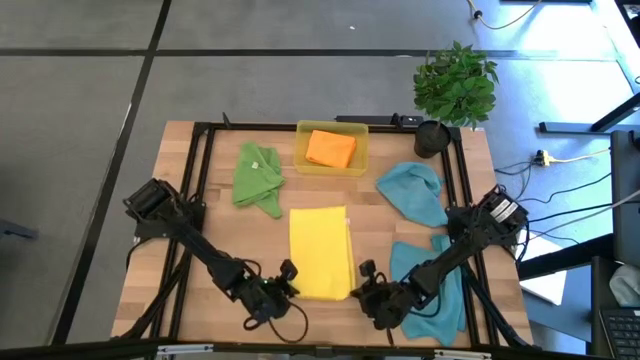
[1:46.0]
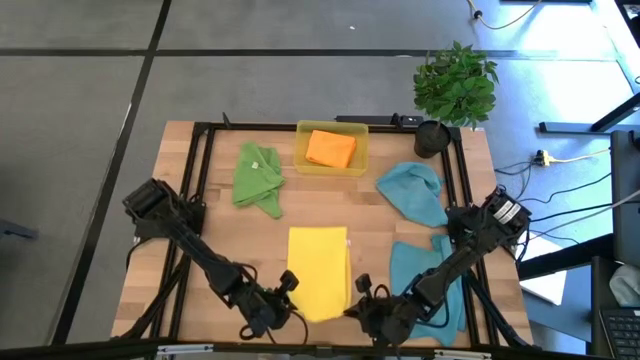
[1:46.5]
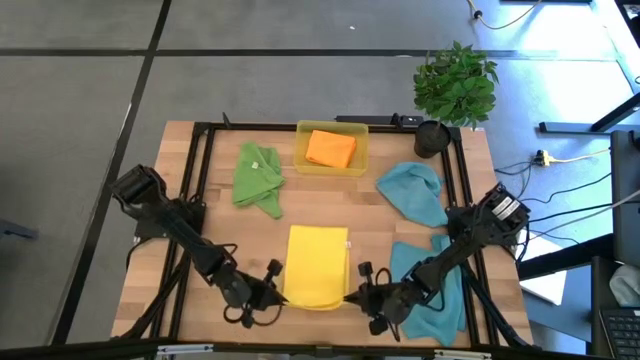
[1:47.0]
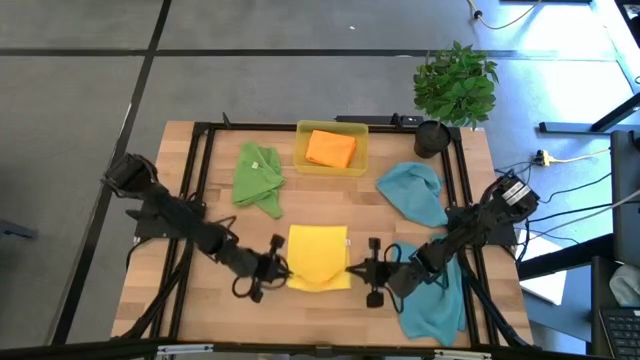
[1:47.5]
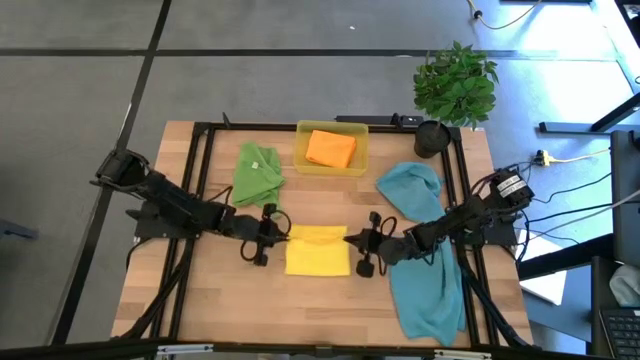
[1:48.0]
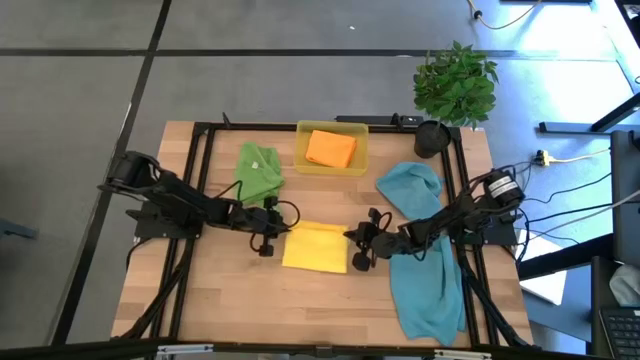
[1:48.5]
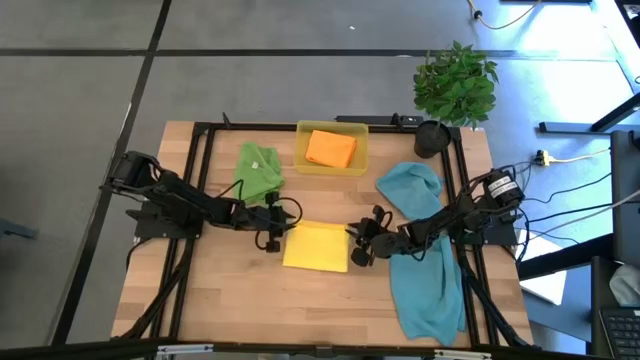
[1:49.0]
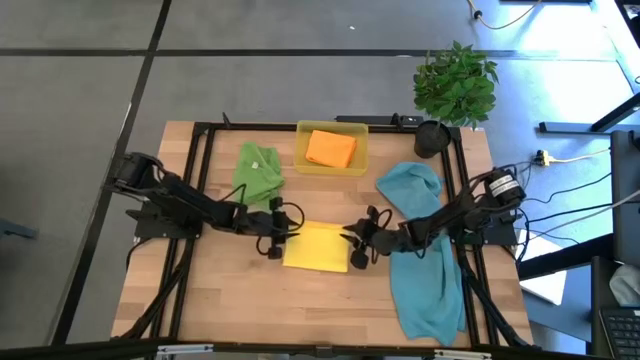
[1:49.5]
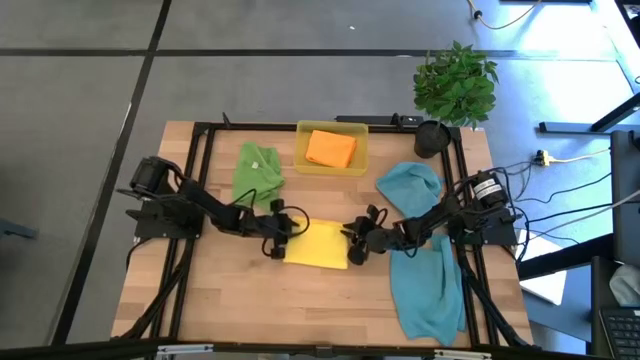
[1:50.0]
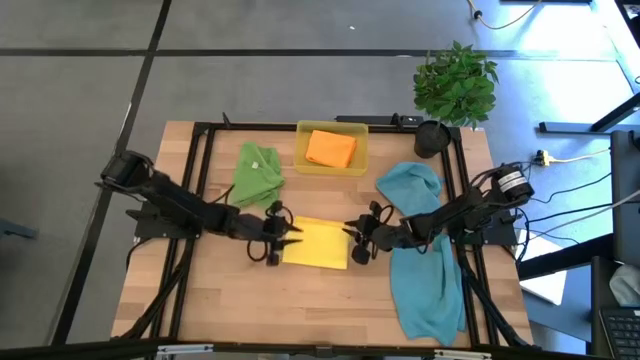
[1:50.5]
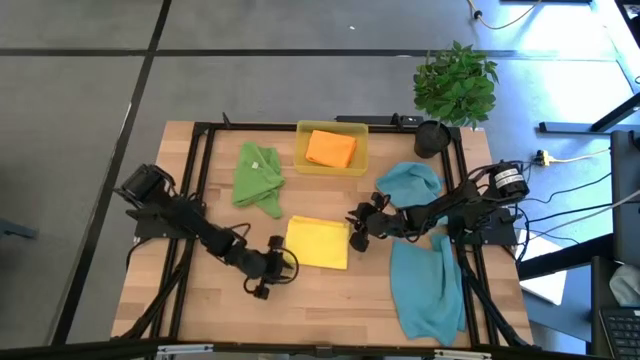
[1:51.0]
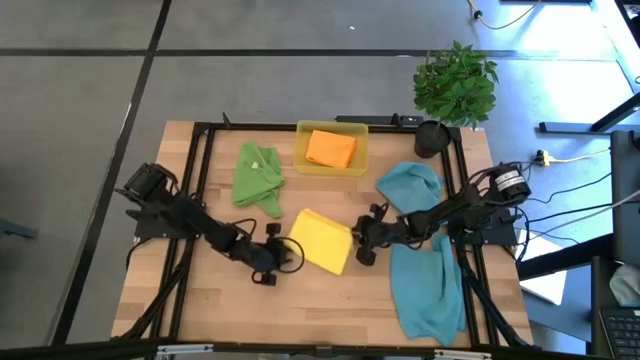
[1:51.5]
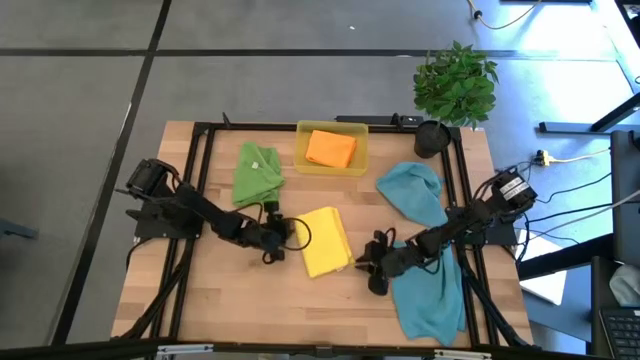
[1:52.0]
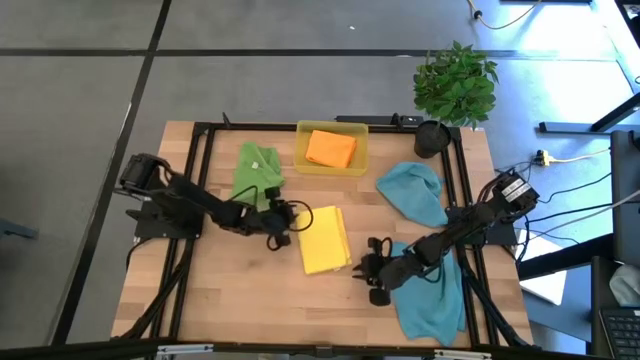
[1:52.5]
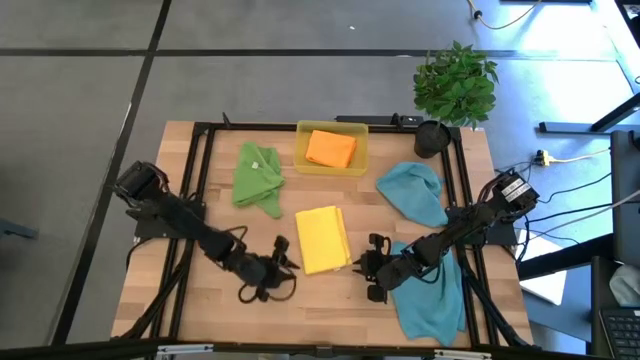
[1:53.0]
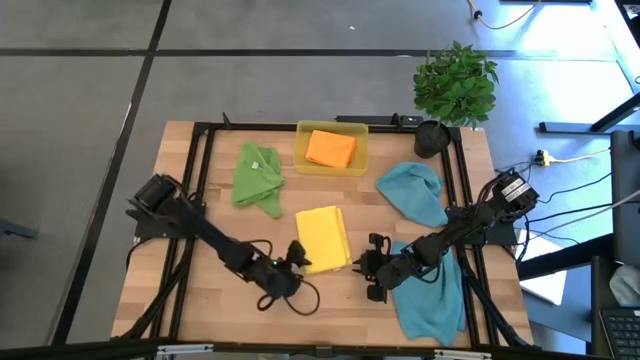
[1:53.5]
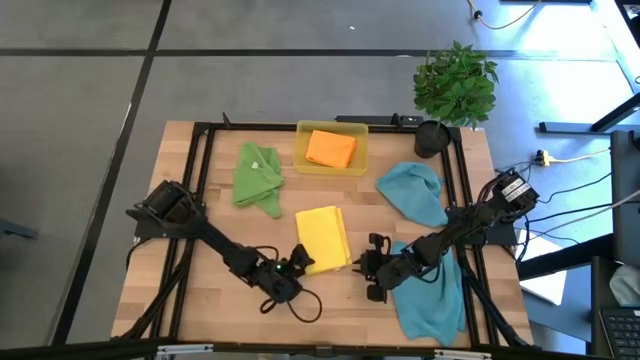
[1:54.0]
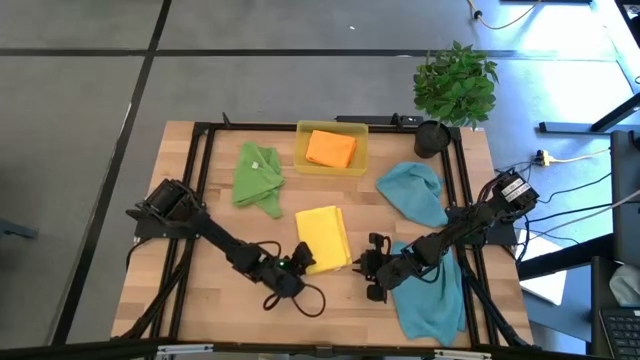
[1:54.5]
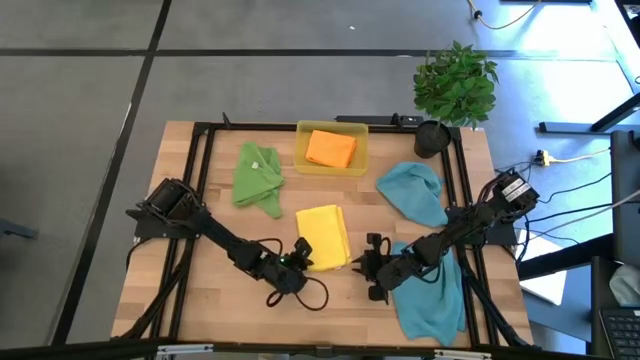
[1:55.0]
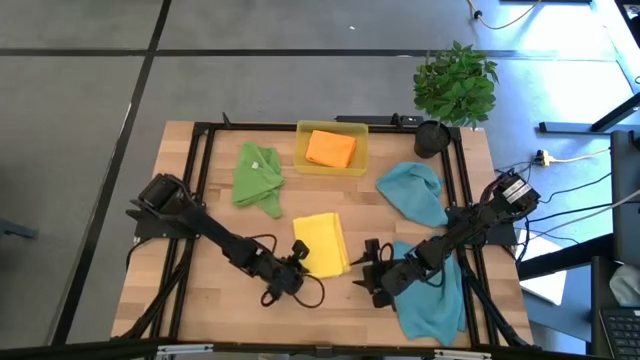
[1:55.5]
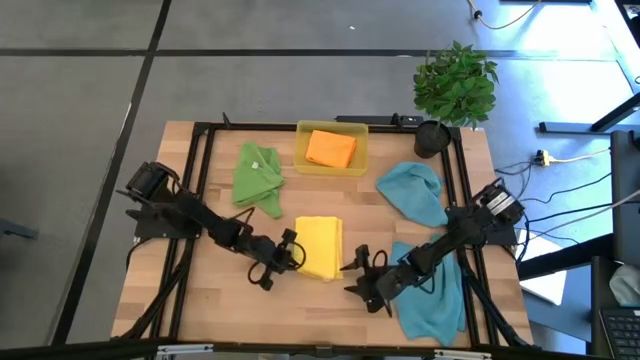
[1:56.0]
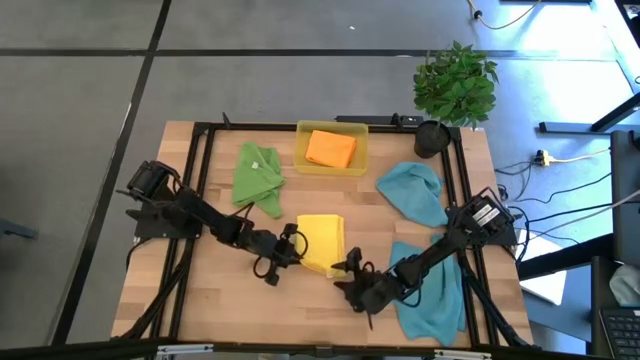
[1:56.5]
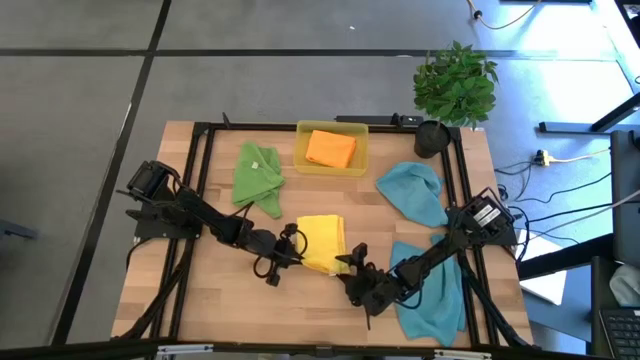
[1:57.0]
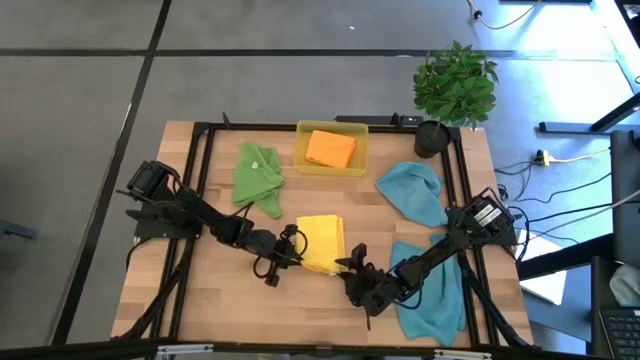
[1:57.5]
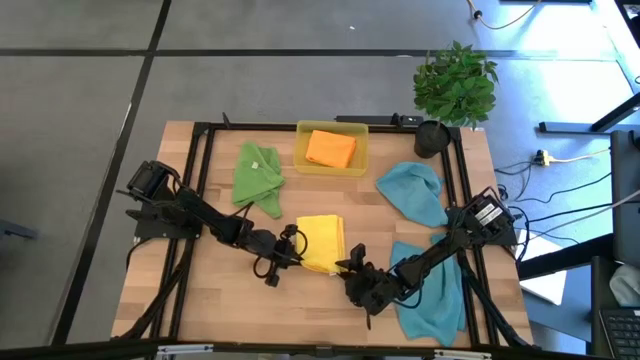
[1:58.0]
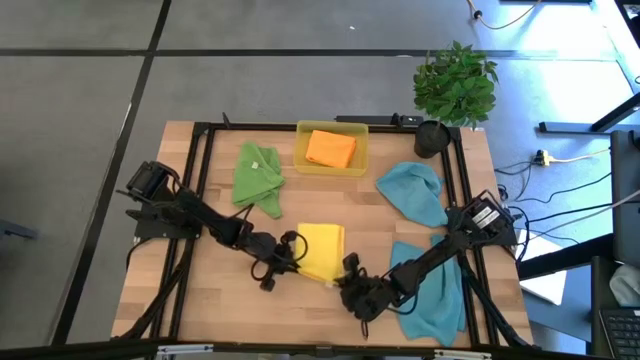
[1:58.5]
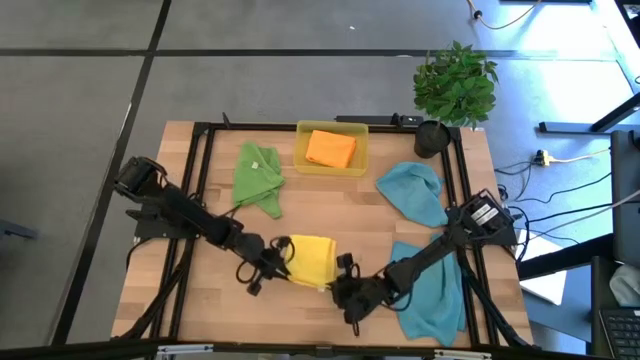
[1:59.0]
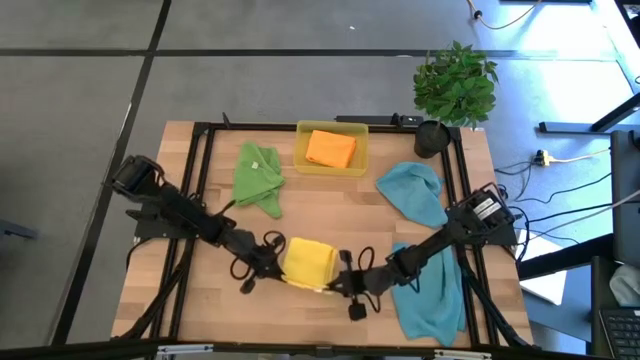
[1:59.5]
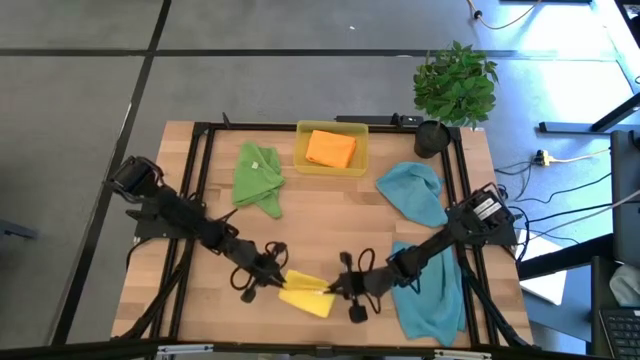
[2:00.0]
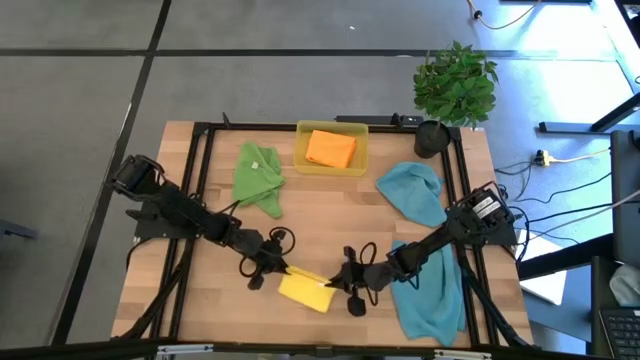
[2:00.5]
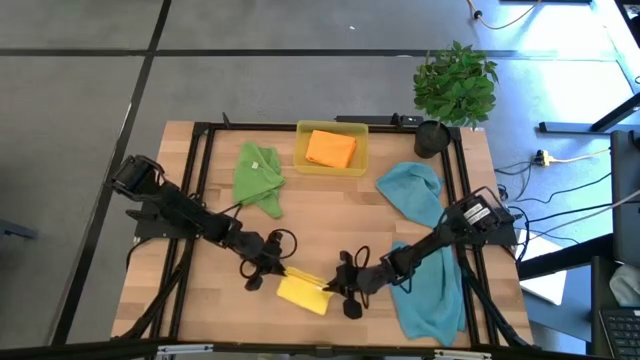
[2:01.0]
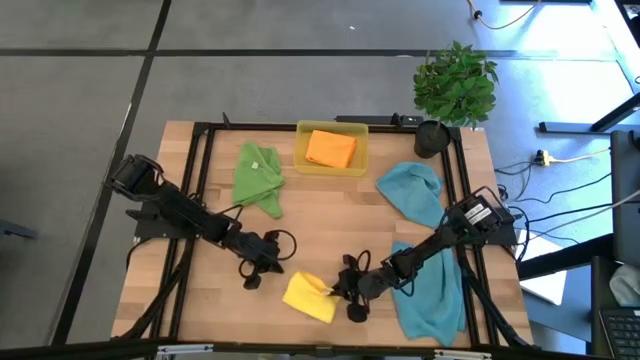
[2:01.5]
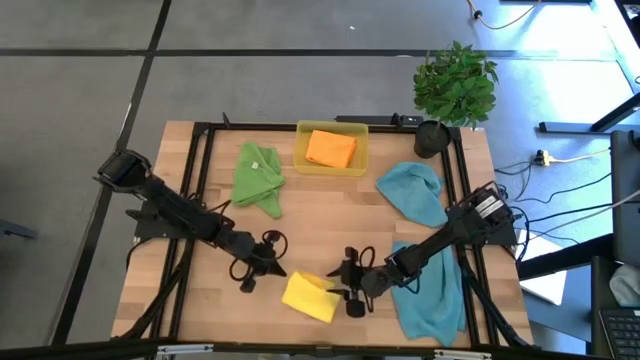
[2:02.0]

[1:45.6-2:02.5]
Task: Fold microfiber towels
Fold the yellow microfiber cloth

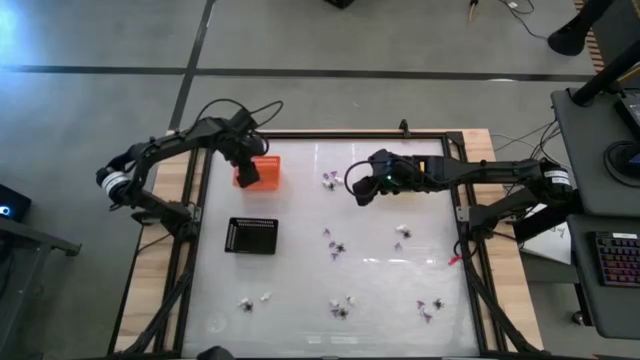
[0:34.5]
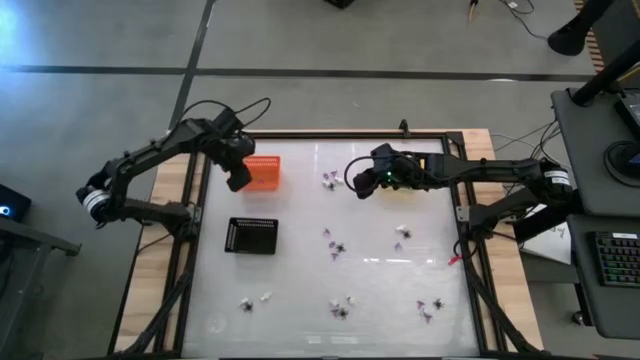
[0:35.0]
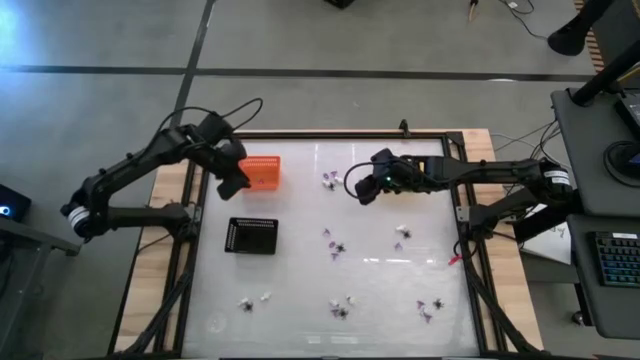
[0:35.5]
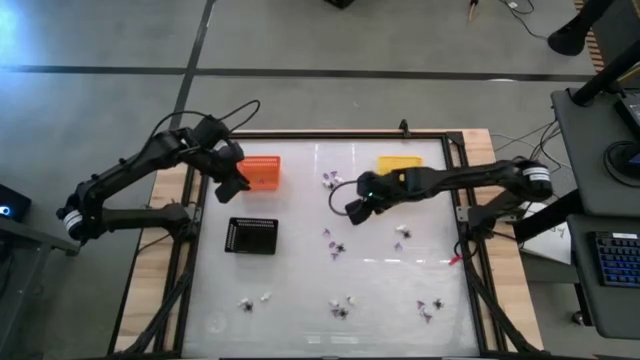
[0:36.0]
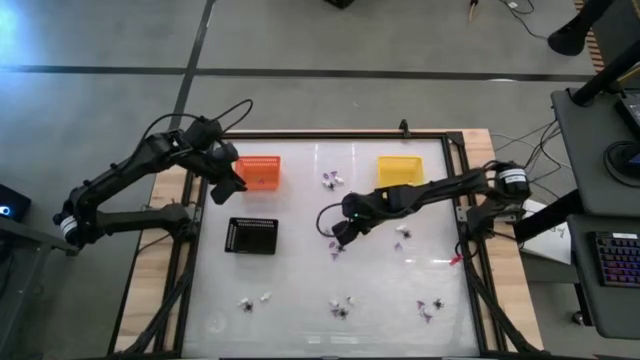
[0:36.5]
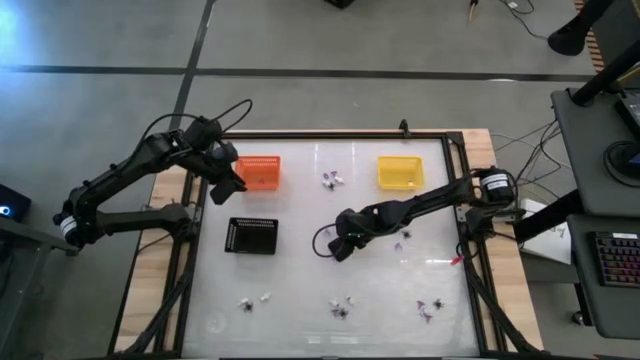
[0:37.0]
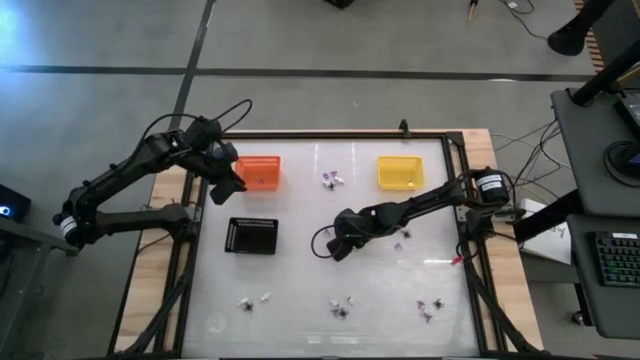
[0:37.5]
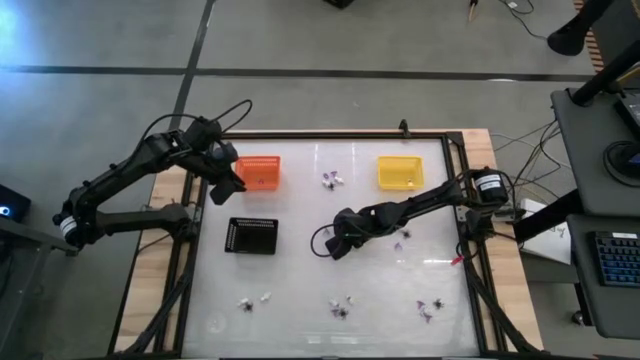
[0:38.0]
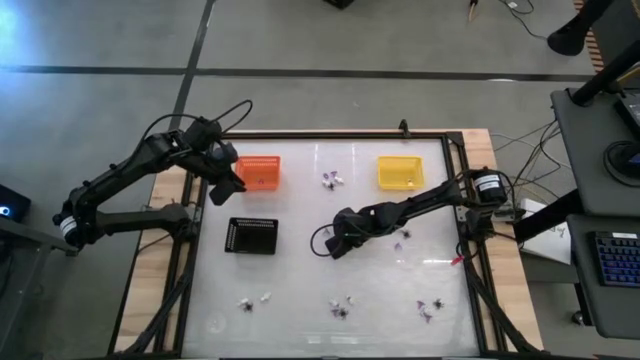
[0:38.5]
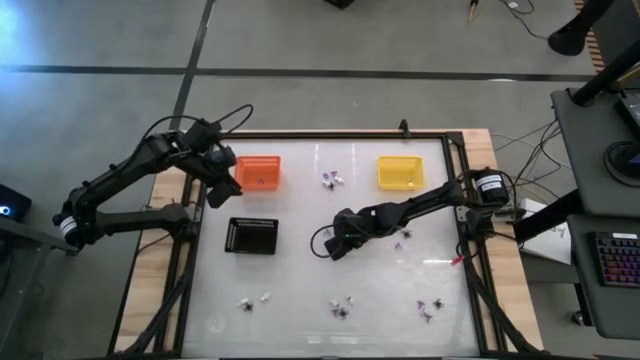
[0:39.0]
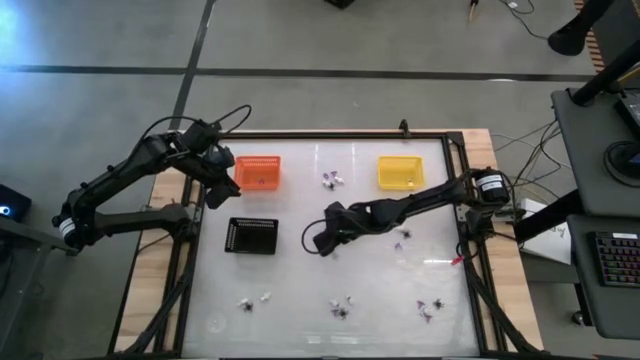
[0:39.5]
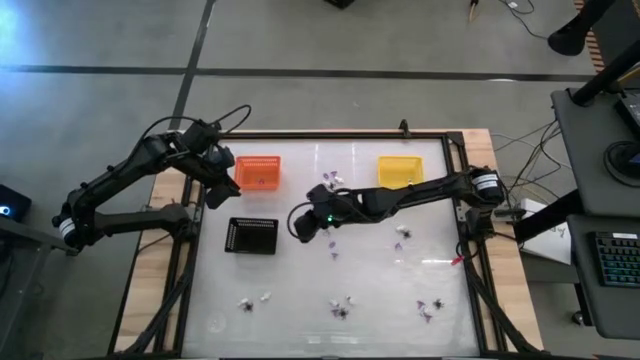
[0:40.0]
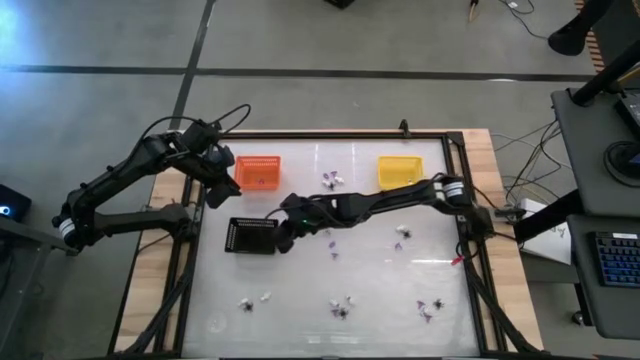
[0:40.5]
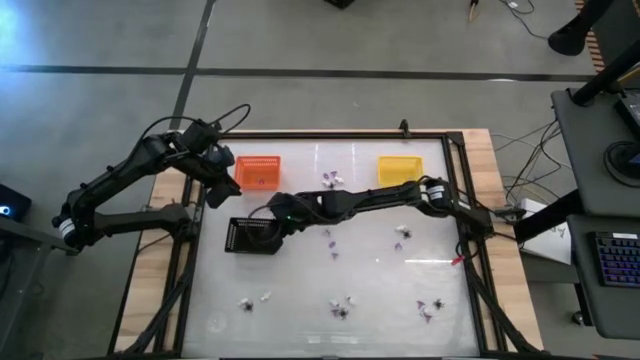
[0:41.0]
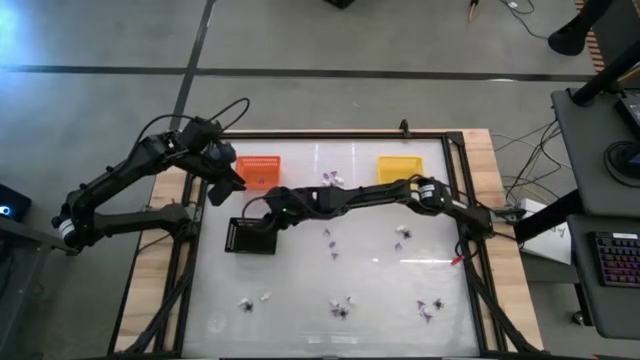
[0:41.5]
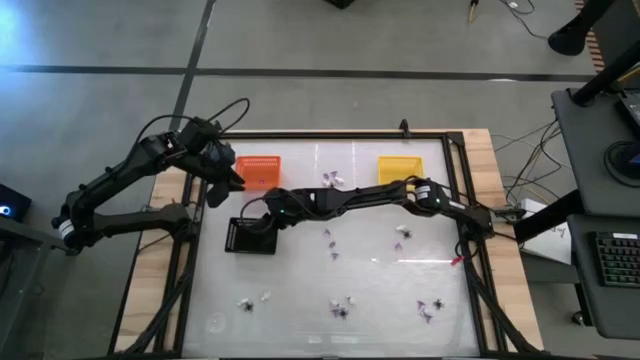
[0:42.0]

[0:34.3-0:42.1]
Task: Sort Halloween decoration
Put the black spider toy into the black bin
